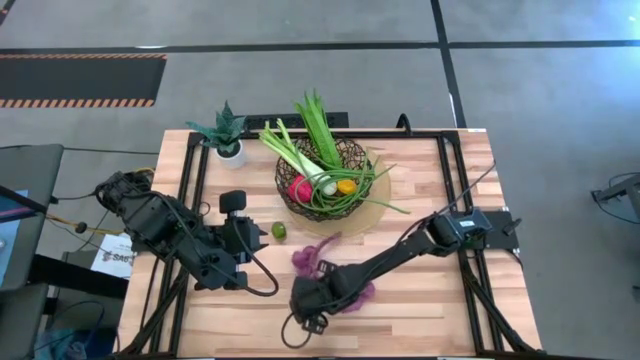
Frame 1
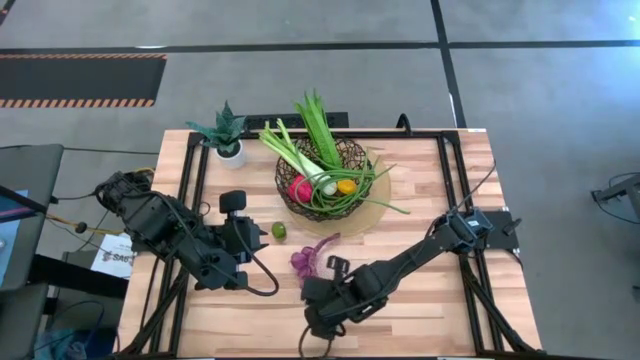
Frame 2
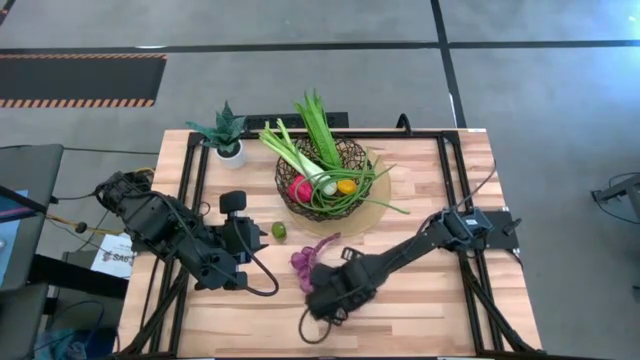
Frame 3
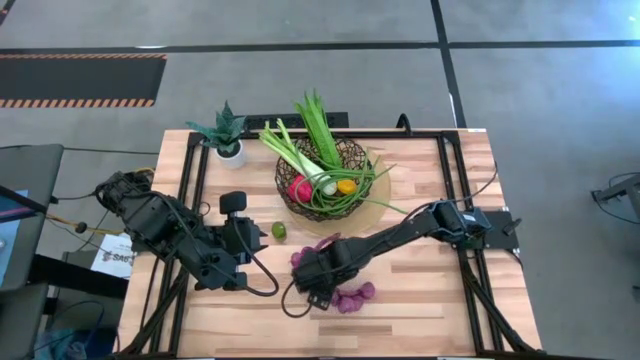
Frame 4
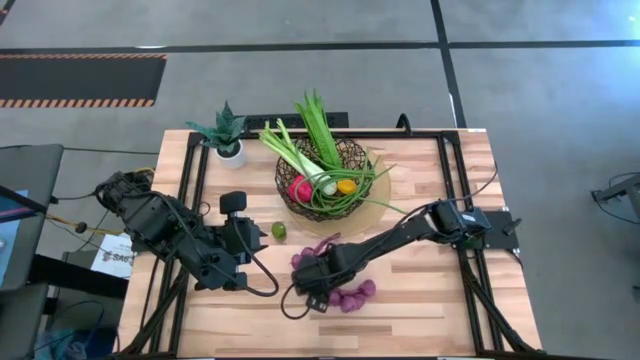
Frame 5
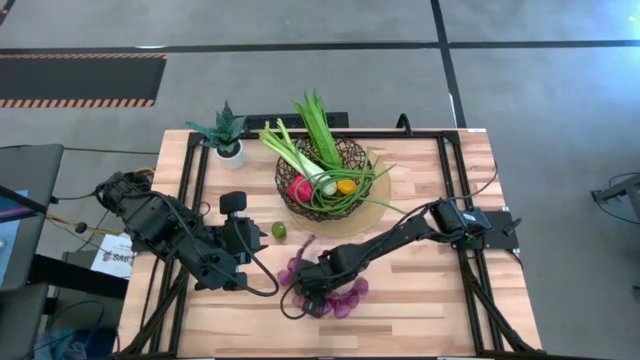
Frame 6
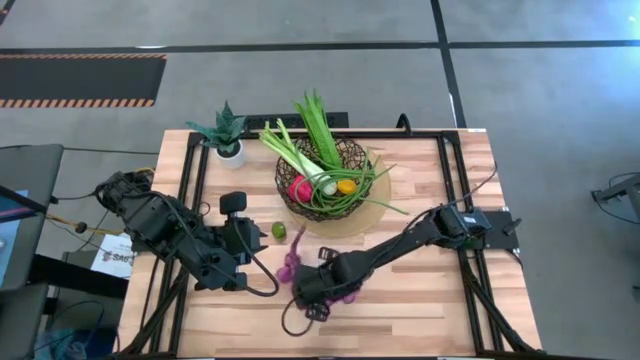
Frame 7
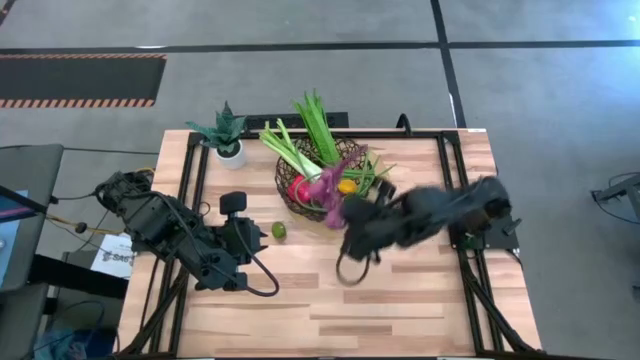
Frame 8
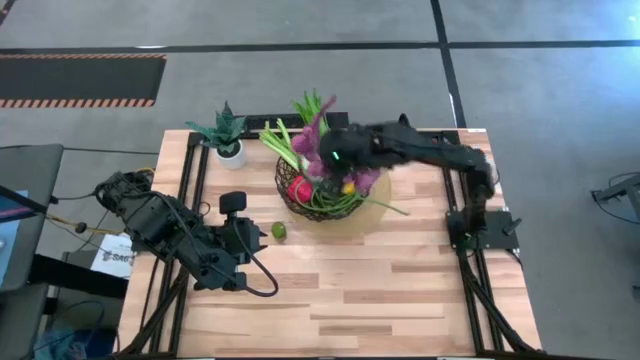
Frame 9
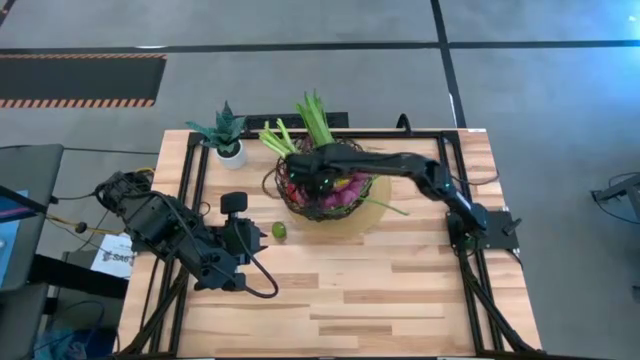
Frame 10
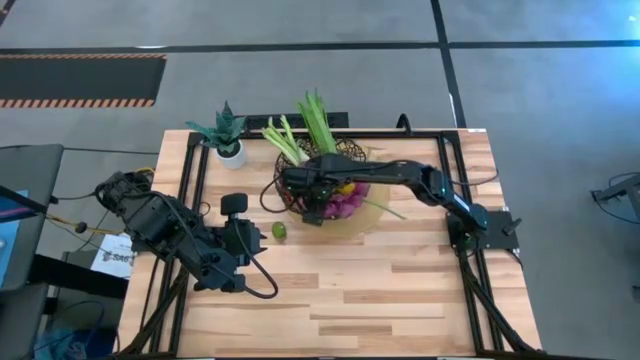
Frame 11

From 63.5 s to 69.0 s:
Task: Build produce basket
Put the purple garlic into the basket

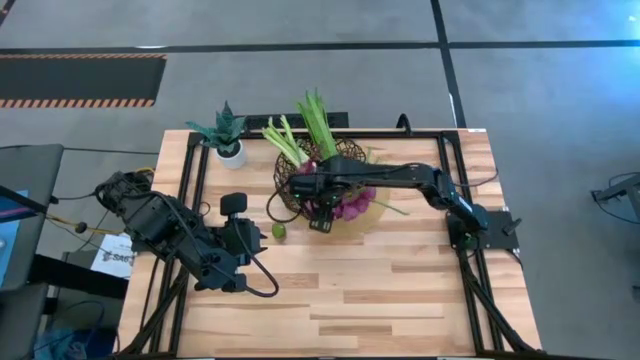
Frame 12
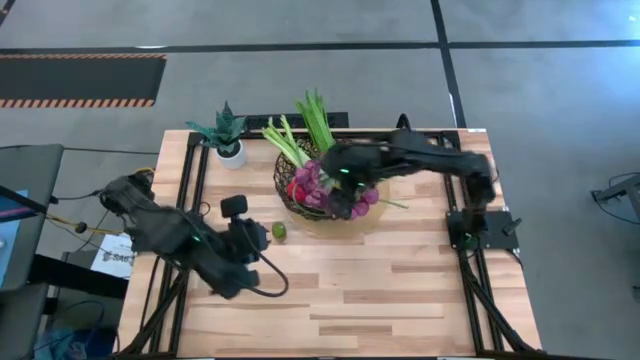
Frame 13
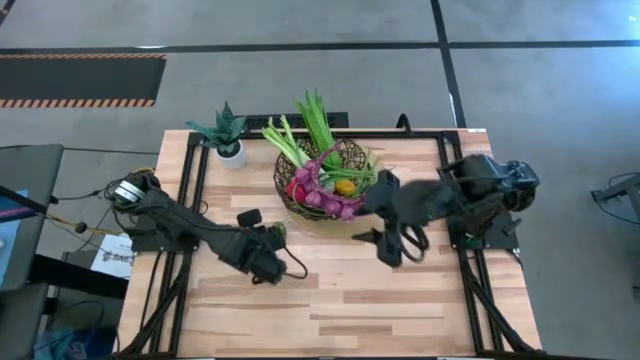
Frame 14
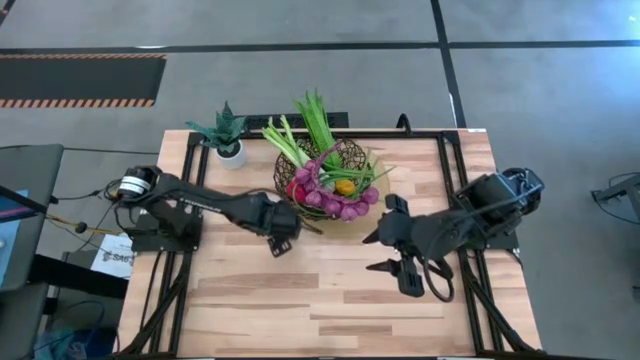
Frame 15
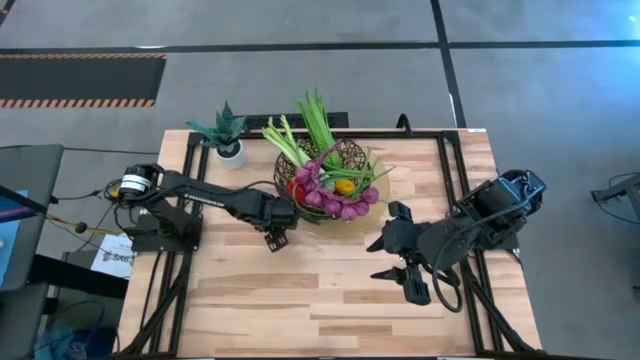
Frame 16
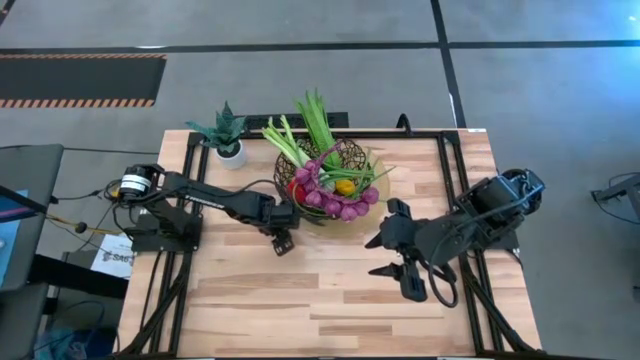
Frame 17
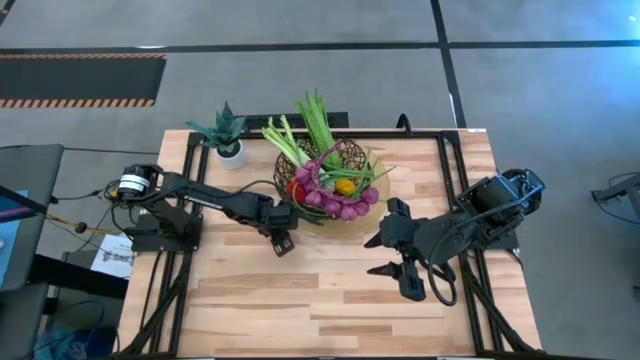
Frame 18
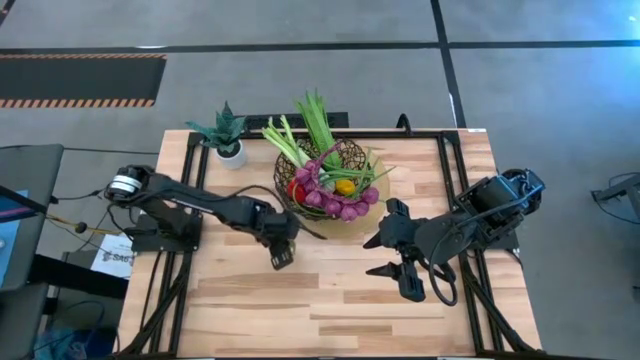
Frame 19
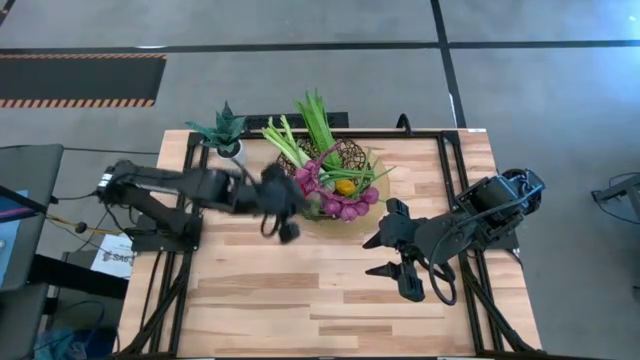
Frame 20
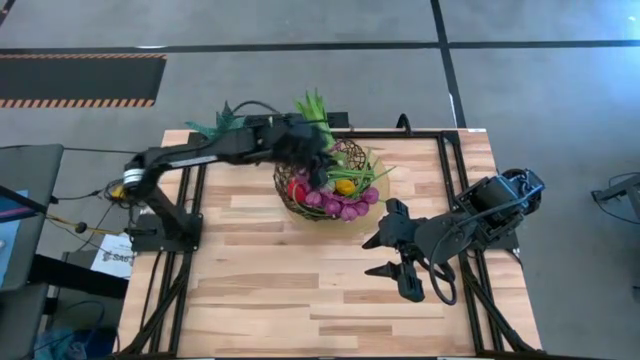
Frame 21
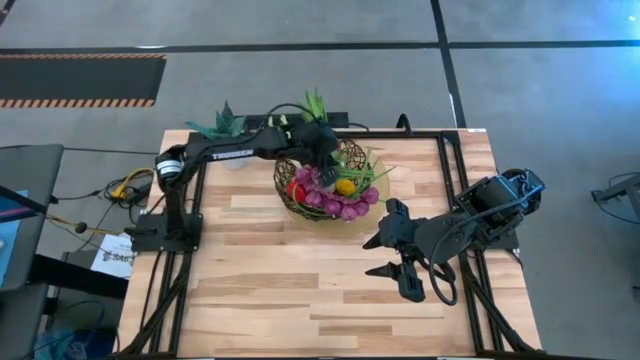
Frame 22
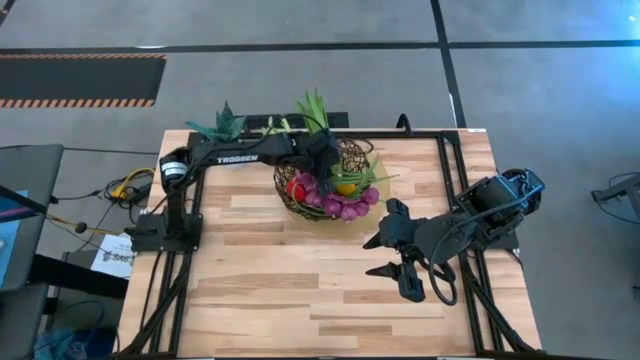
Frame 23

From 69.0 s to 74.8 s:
Put the lime into the basket

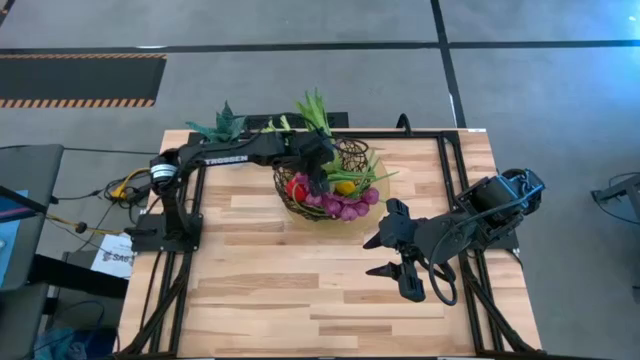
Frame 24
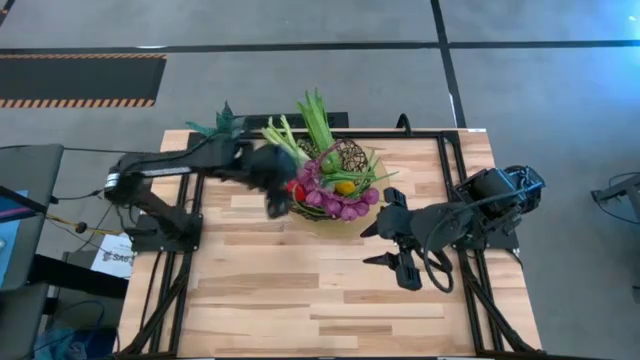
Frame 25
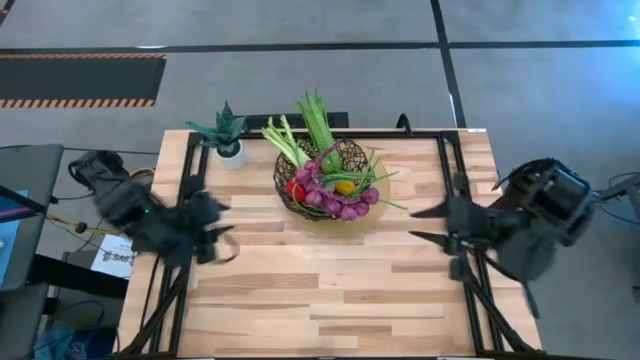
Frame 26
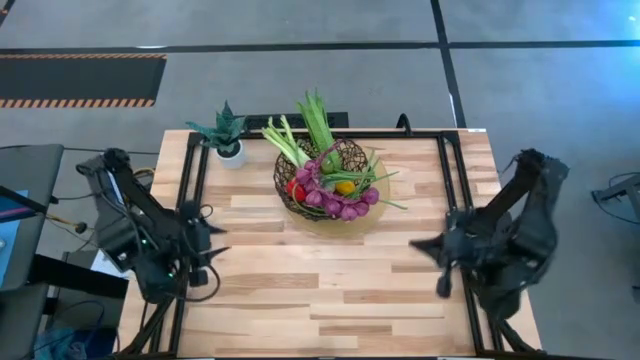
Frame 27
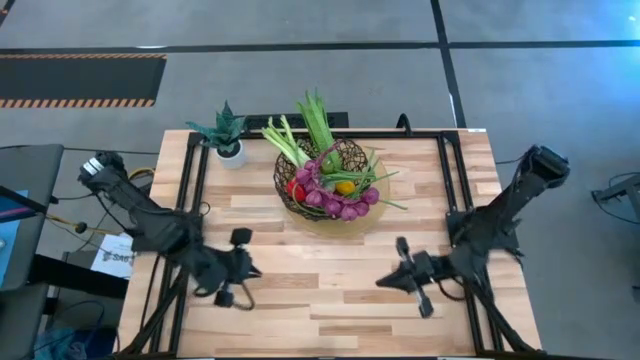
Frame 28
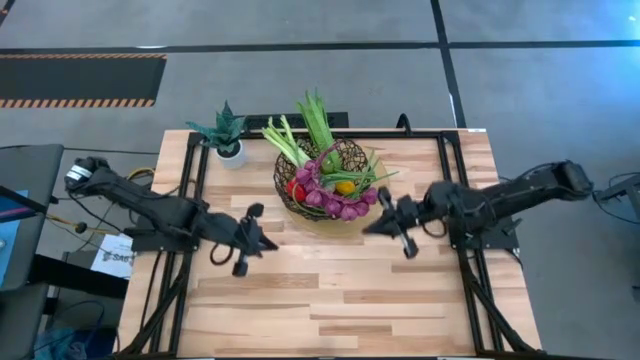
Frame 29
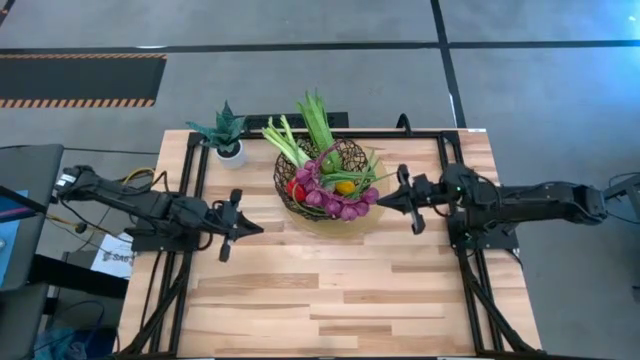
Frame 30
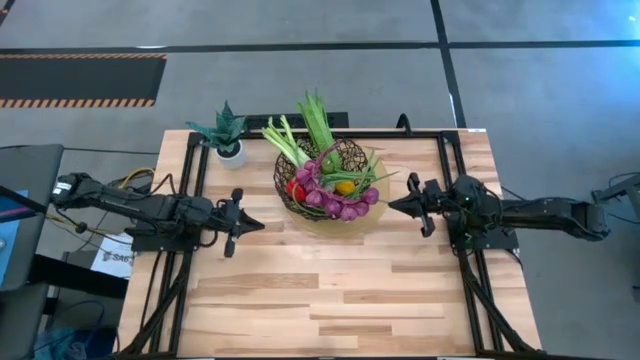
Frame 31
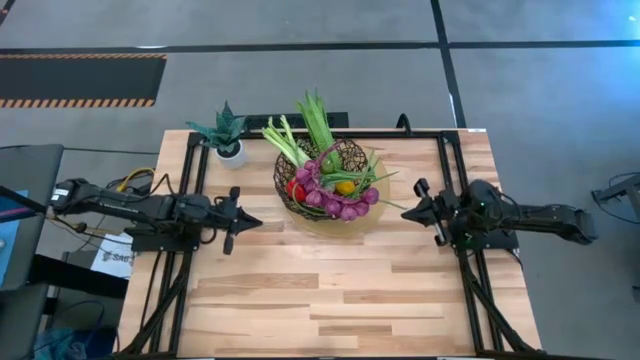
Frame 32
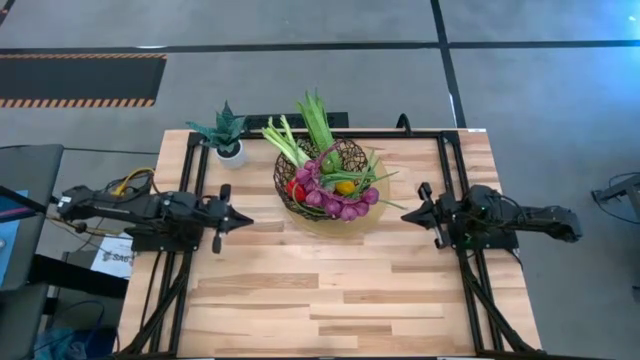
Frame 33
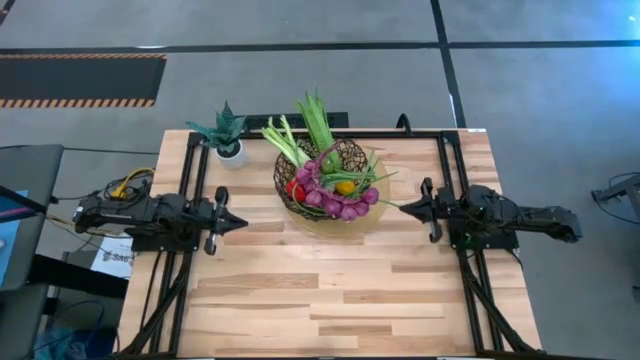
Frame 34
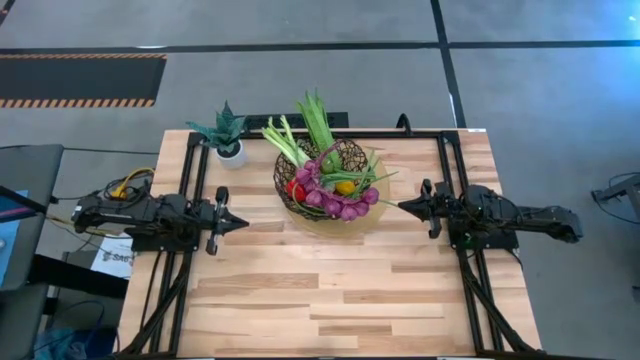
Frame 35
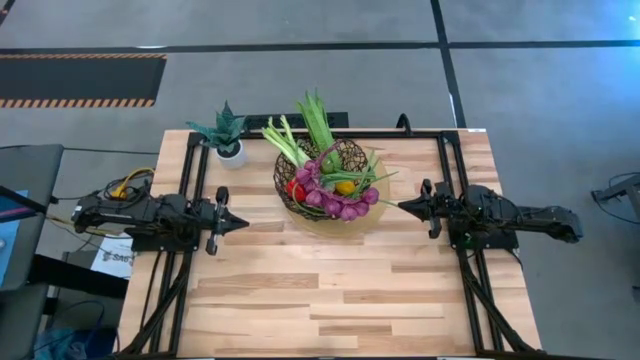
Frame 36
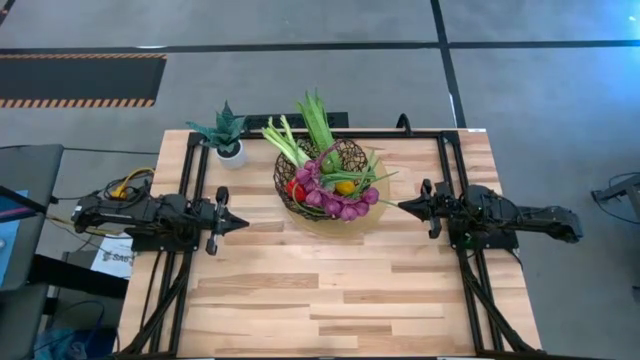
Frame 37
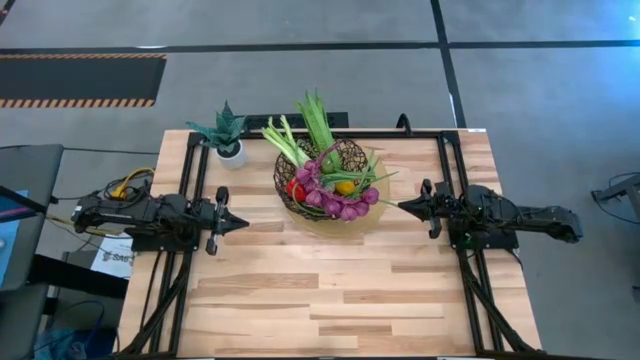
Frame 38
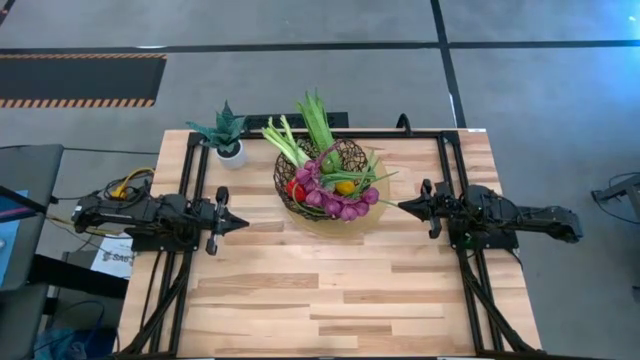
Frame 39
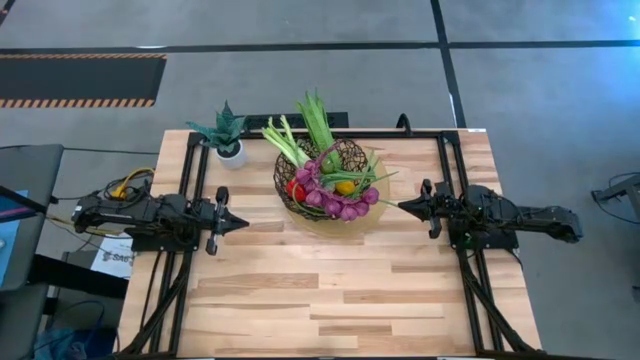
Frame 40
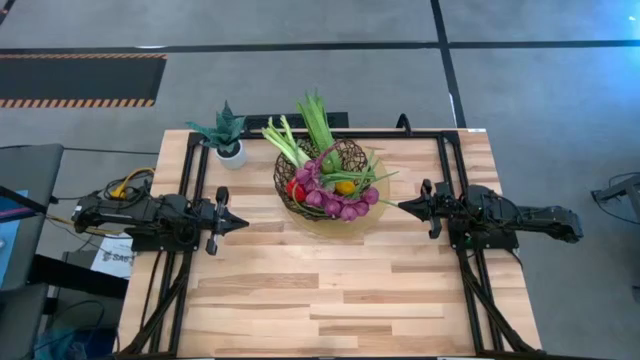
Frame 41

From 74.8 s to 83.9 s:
Return to Home Position
